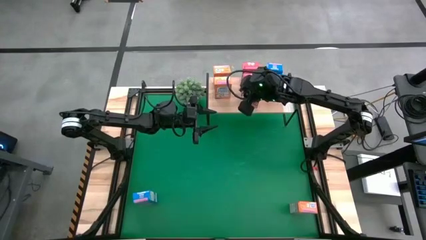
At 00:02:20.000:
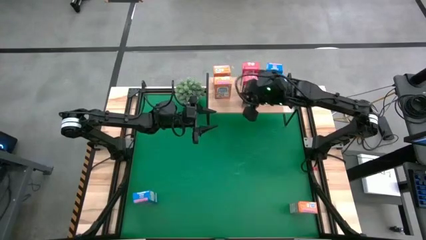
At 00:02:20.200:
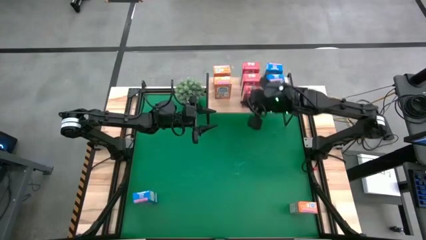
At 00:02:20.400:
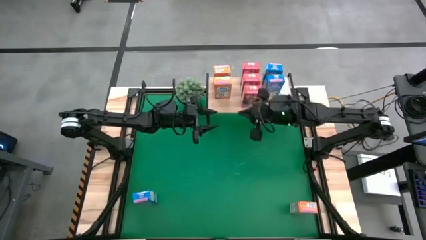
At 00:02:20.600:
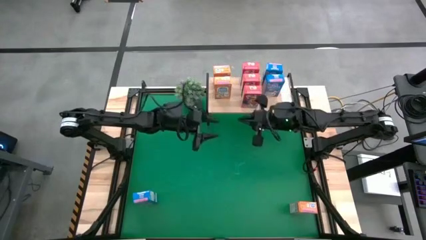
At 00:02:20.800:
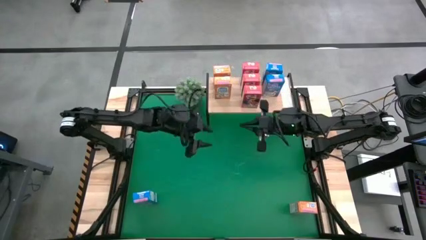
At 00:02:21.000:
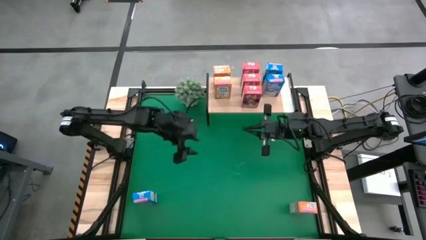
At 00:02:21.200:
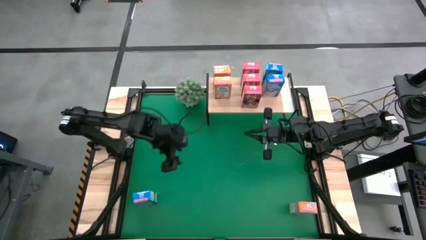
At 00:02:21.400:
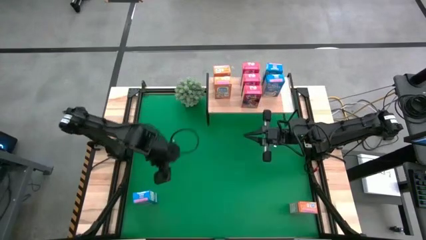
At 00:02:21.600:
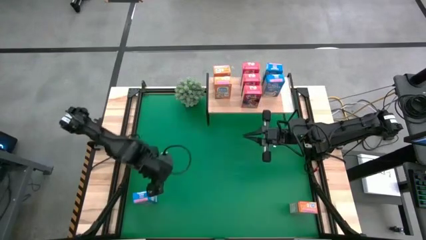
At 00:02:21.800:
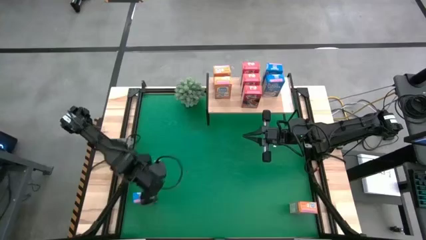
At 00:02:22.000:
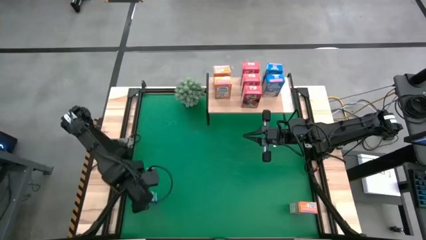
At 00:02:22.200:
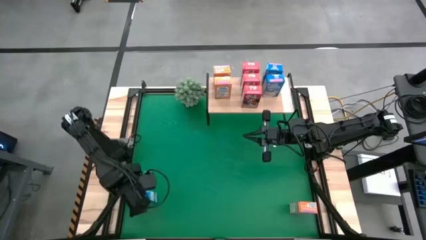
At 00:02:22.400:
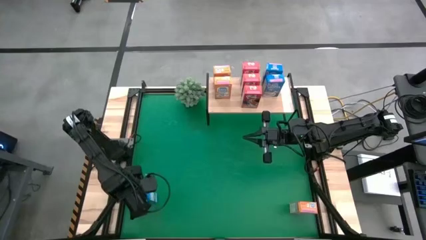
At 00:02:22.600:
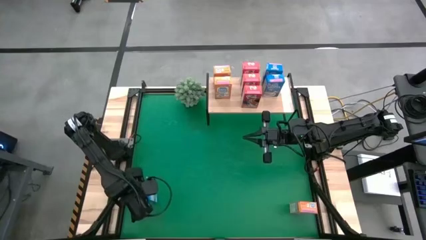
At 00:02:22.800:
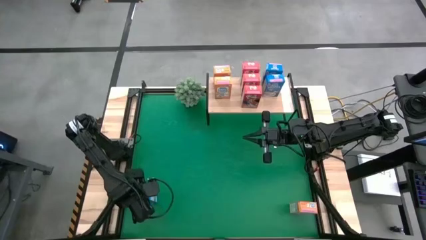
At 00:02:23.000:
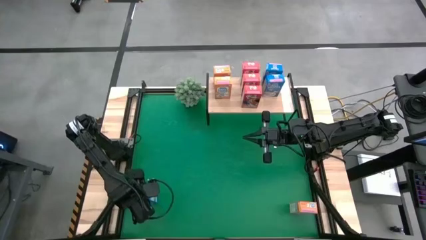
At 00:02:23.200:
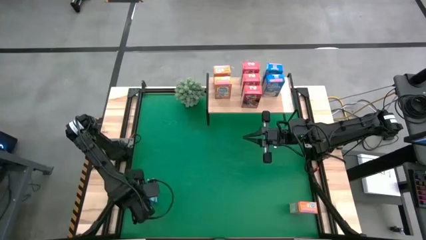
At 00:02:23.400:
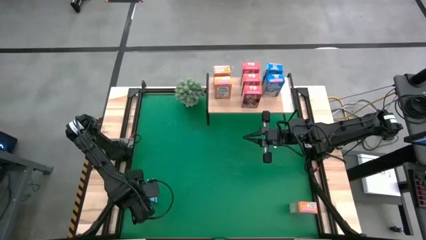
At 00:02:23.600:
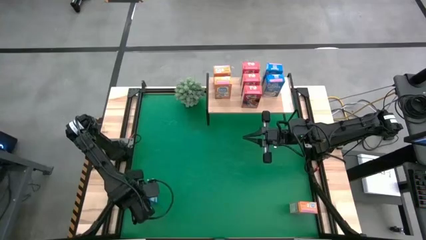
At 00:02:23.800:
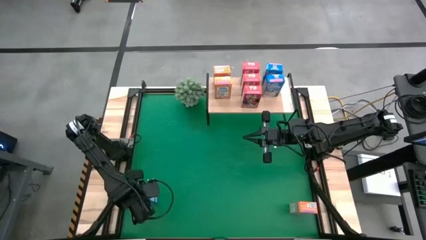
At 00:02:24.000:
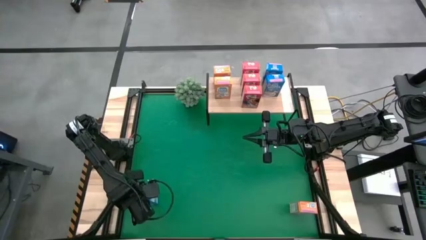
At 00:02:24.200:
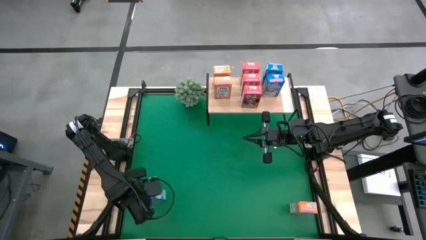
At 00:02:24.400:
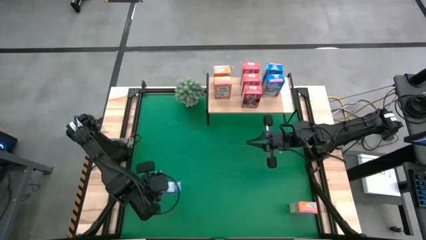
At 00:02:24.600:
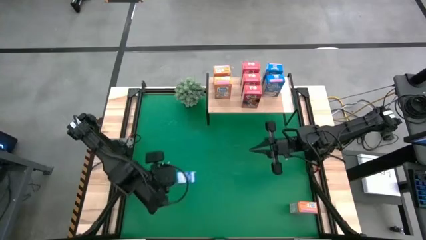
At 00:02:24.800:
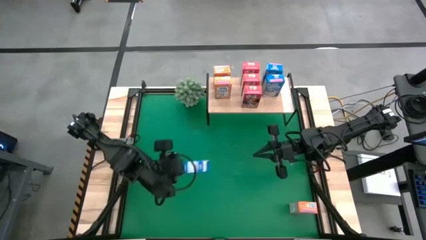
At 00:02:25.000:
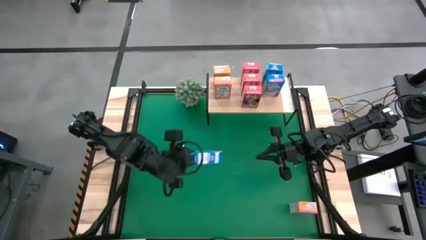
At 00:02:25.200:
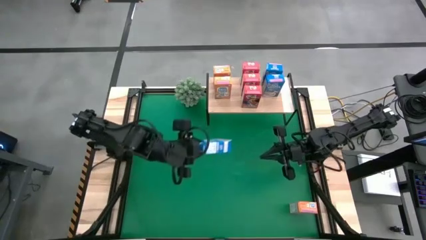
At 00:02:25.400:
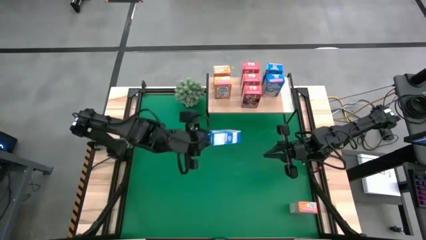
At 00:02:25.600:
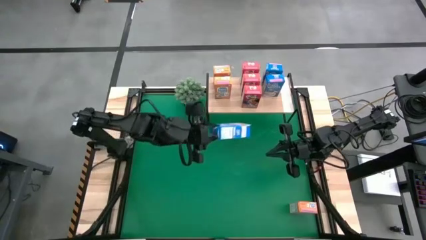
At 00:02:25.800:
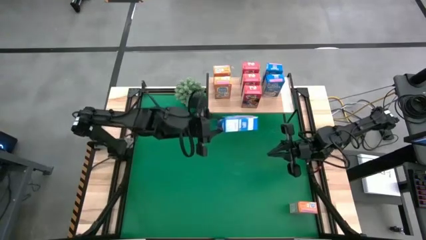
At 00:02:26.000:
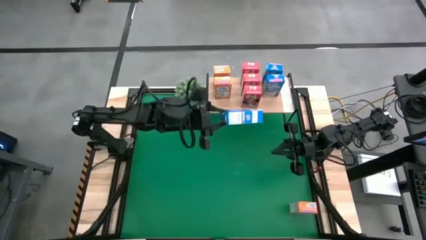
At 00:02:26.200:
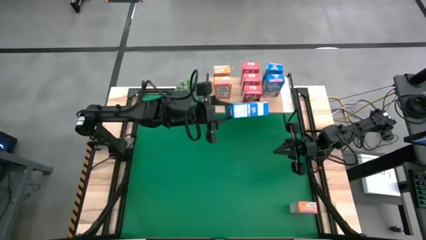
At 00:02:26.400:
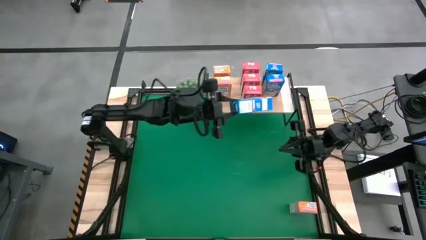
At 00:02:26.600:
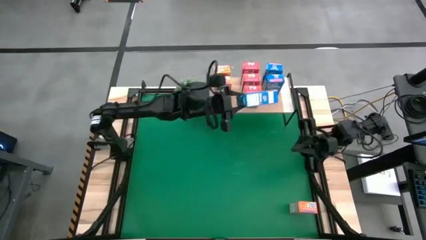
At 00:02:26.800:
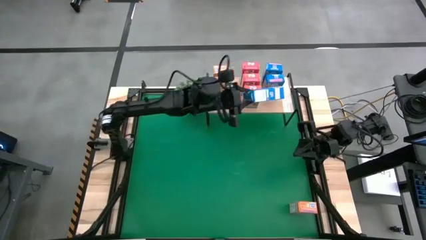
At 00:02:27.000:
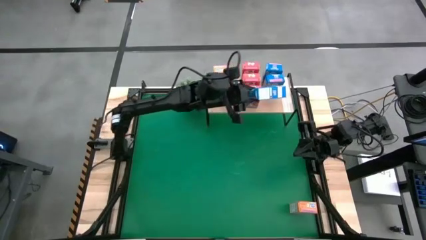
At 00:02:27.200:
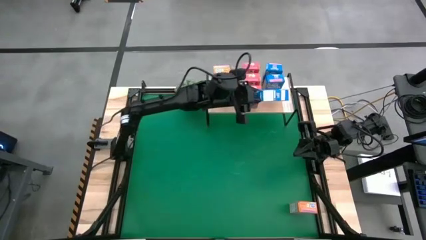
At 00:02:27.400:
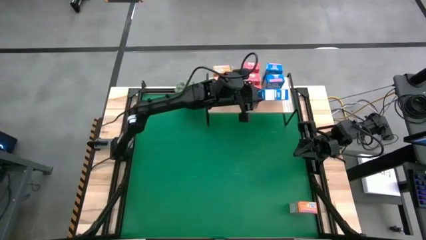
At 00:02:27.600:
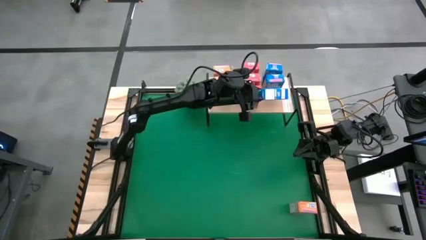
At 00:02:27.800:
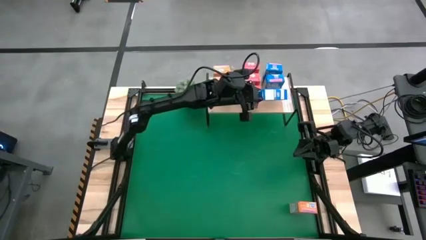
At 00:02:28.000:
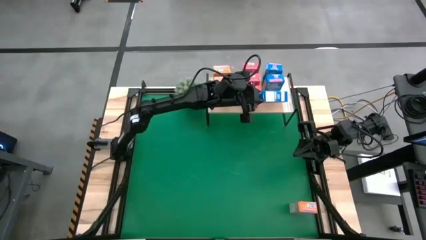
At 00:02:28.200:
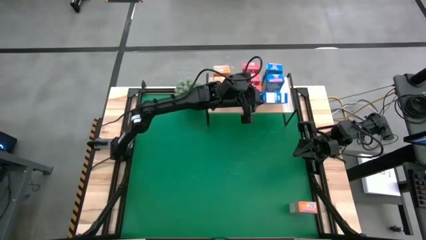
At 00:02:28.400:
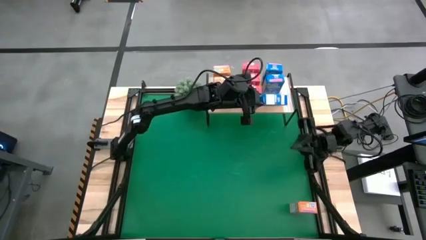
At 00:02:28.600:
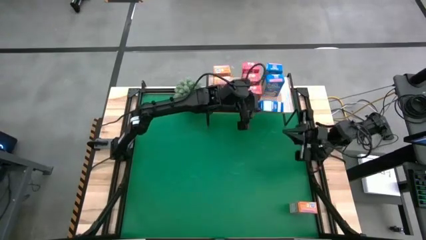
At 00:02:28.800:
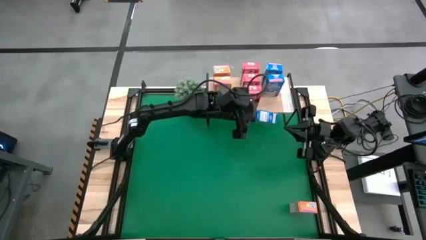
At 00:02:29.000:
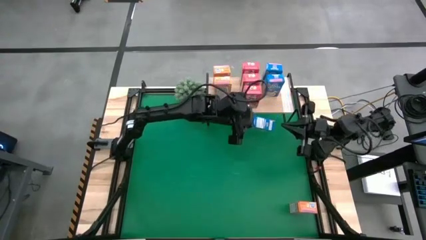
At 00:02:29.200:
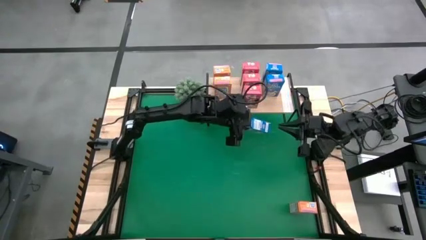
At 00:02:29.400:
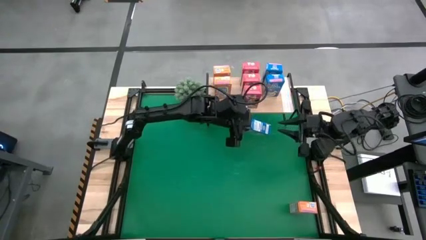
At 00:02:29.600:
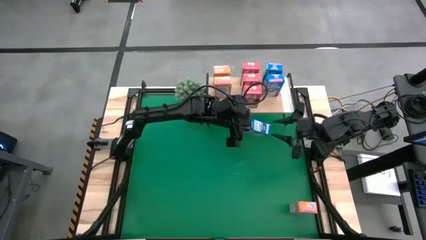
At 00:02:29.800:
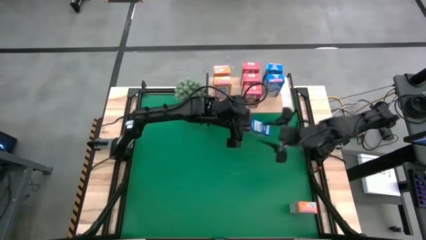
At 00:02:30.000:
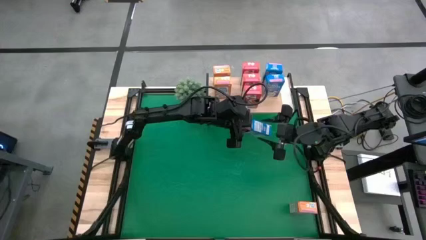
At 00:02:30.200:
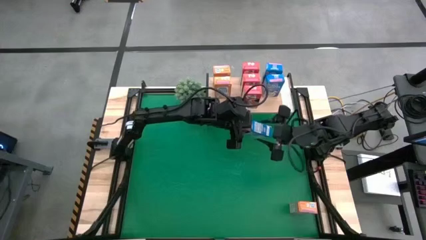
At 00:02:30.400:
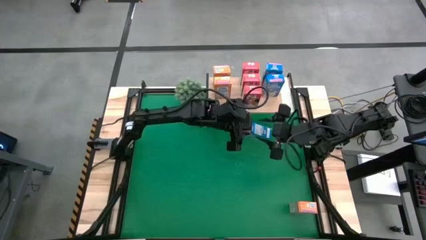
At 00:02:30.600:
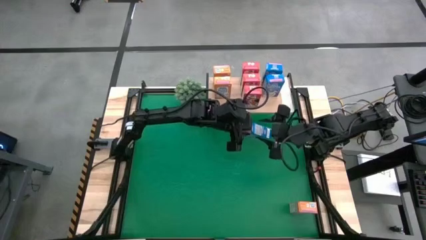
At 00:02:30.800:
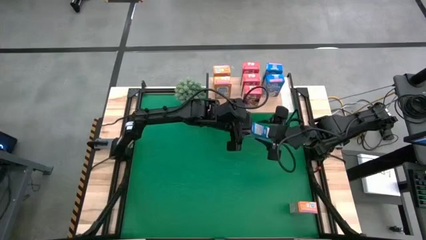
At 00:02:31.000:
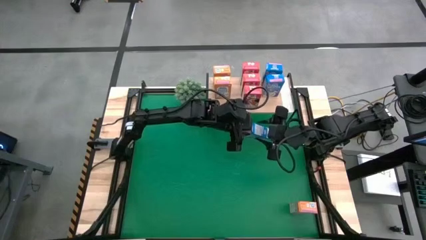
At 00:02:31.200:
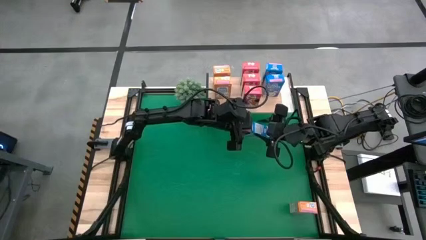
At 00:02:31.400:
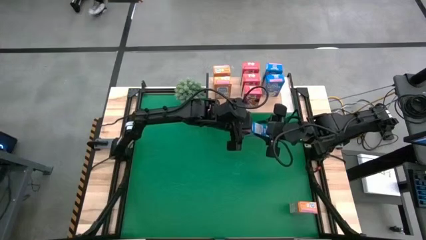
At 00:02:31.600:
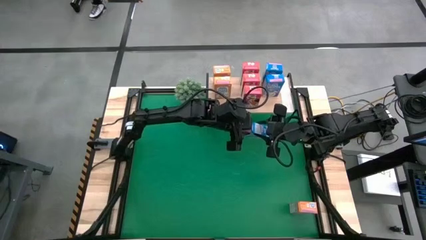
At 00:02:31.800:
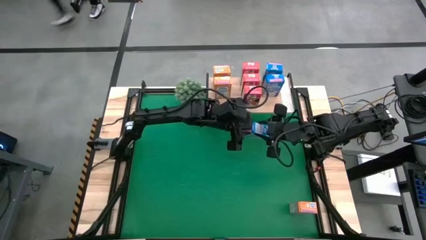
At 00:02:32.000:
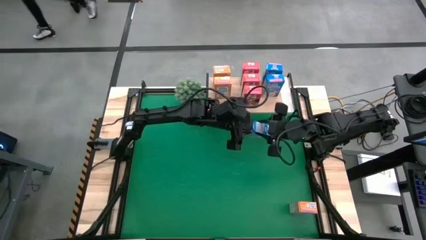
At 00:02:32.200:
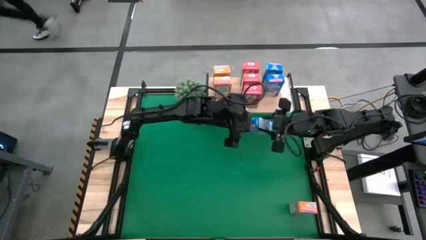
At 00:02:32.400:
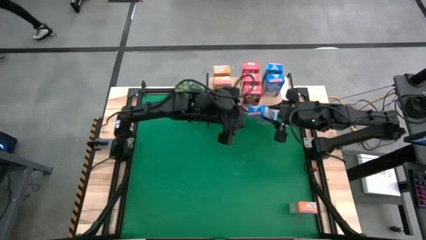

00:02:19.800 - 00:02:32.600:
Task: Stack cereal on shelf
Put the blue cereal box on the shelf aligned with the other blue cereal box

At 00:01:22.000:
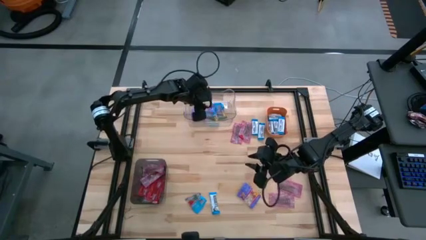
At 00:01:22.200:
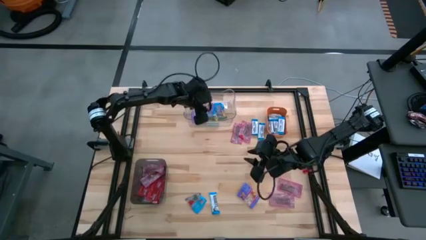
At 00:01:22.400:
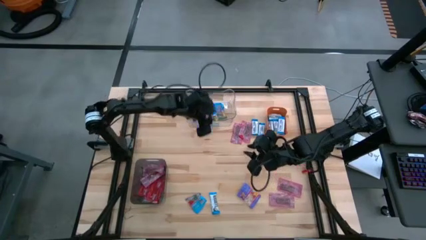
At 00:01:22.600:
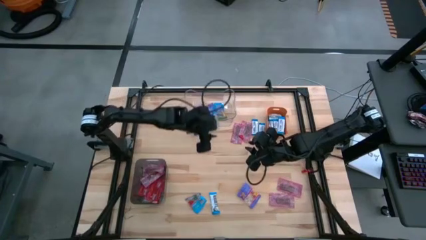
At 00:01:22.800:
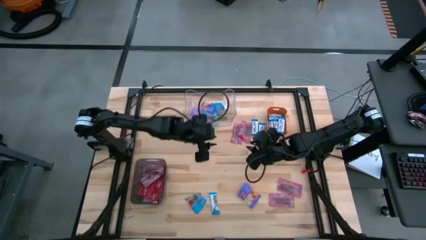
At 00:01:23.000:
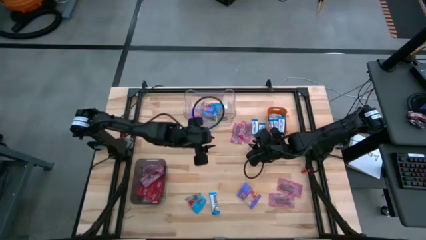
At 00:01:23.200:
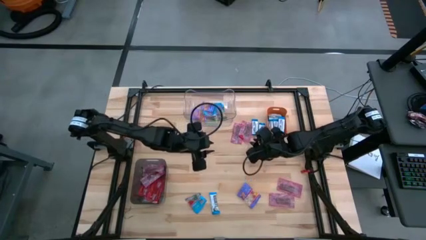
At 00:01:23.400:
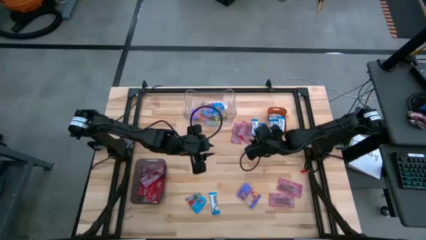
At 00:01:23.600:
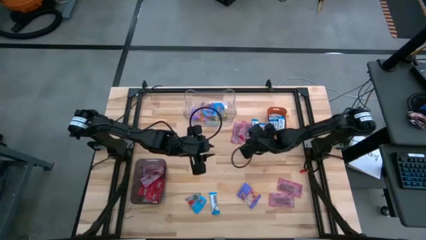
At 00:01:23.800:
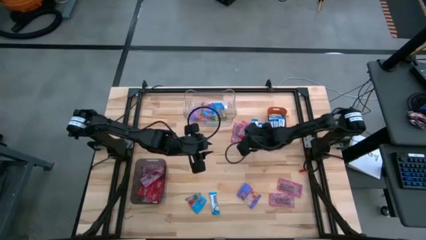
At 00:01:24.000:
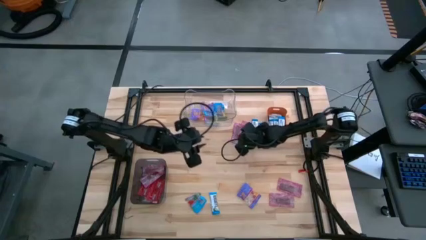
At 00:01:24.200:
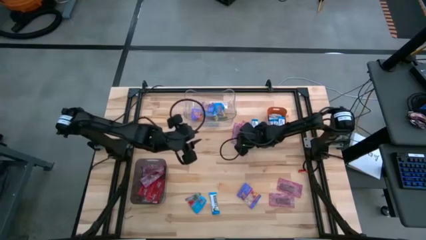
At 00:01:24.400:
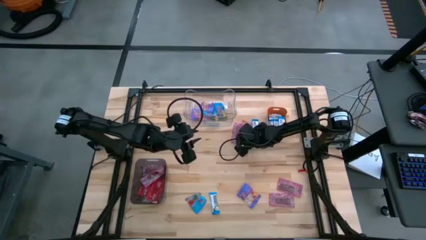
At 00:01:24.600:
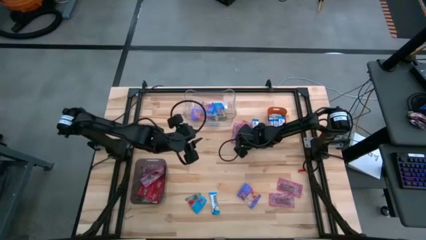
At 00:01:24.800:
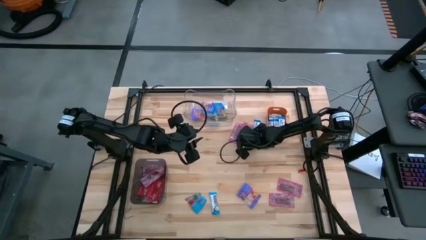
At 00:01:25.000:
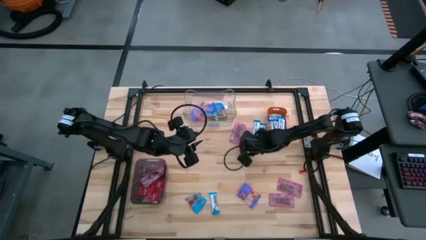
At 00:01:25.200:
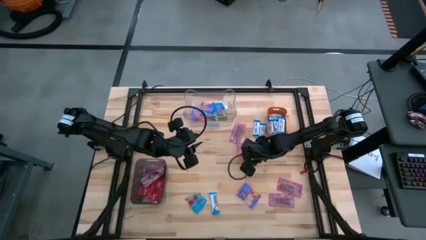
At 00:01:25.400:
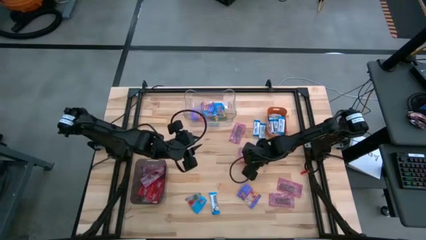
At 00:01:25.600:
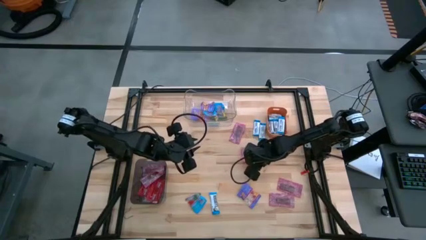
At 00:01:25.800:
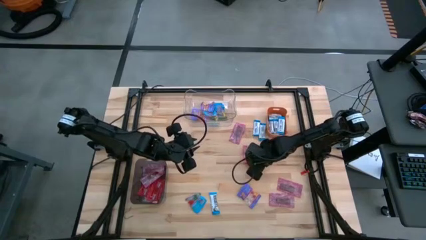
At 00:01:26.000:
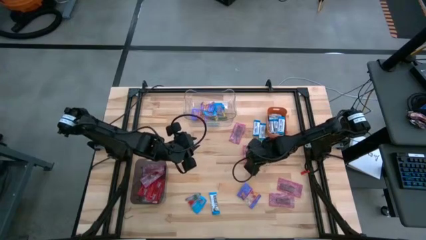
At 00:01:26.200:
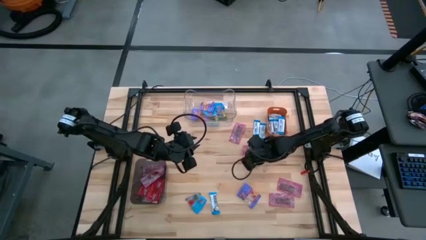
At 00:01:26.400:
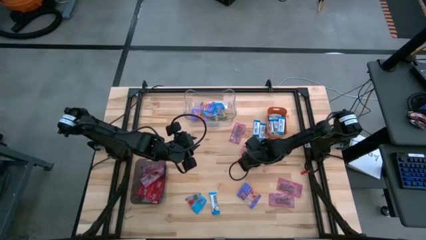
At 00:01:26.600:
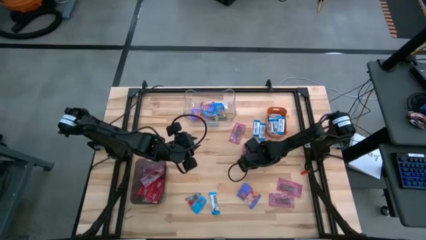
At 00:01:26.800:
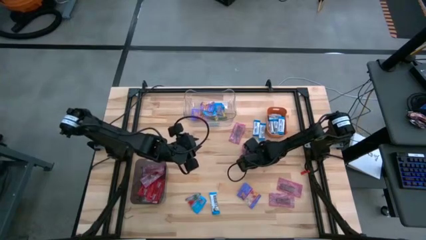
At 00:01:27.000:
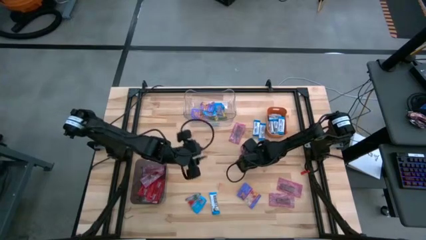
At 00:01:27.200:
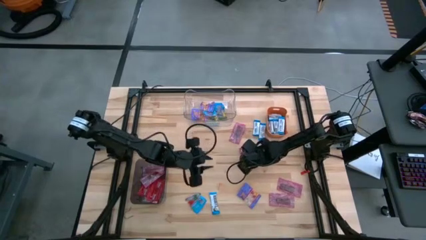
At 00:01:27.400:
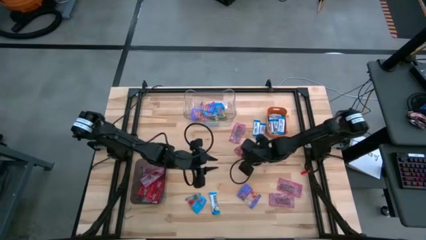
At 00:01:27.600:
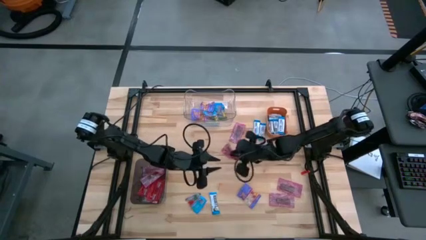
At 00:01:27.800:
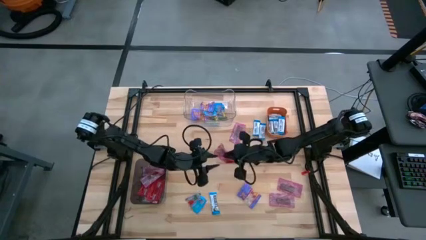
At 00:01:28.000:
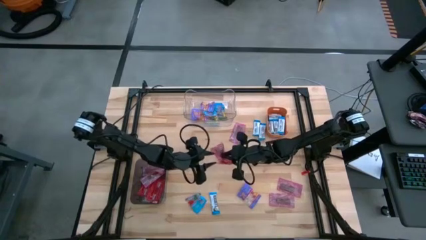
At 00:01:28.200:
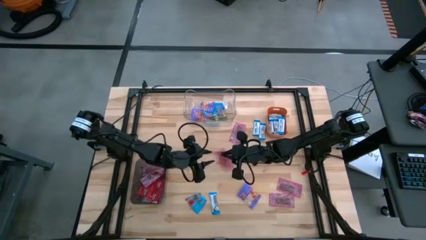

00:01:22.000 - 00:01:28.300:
Task: Sort candy
Put the red candy into the black bin
